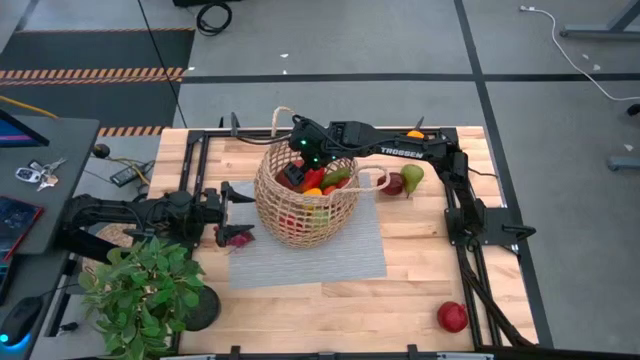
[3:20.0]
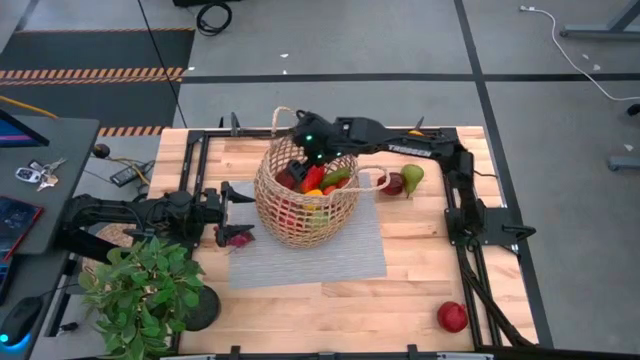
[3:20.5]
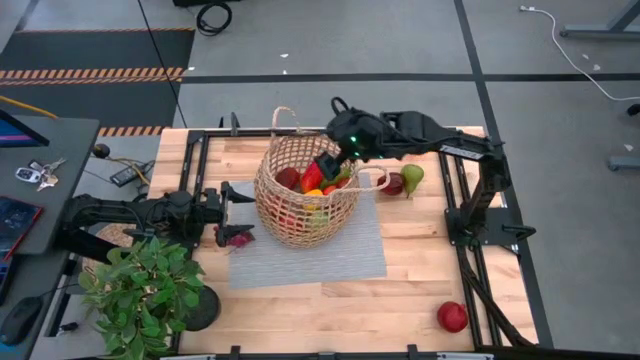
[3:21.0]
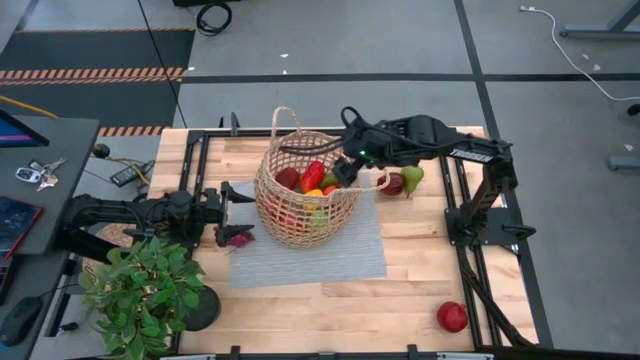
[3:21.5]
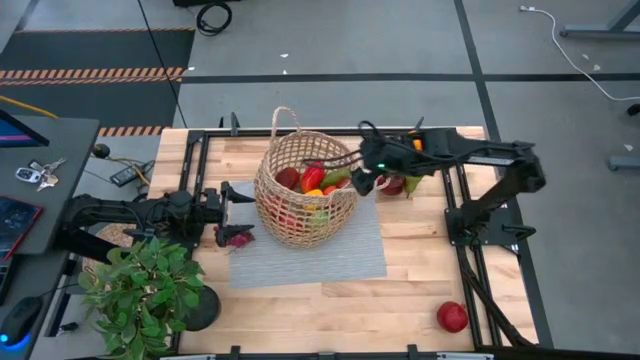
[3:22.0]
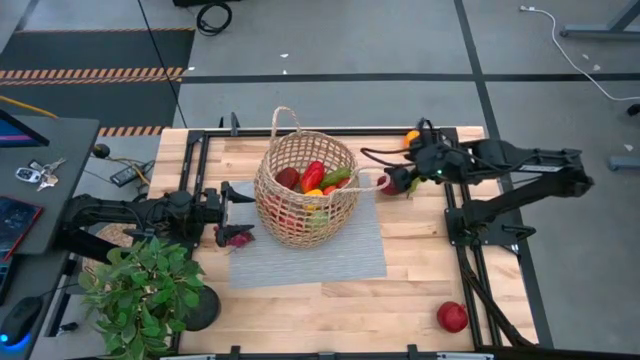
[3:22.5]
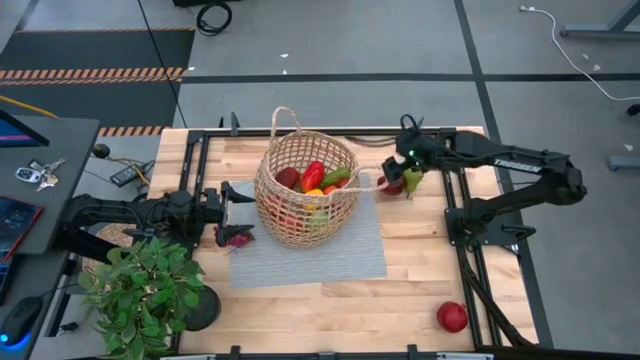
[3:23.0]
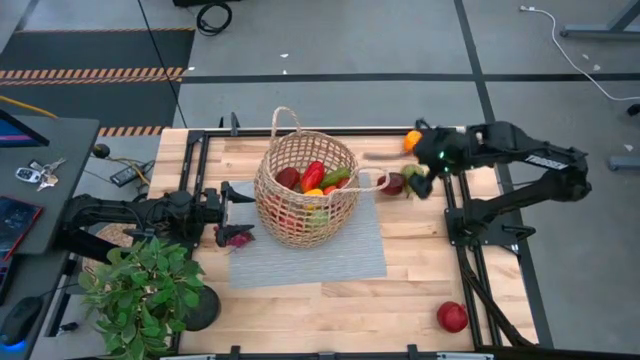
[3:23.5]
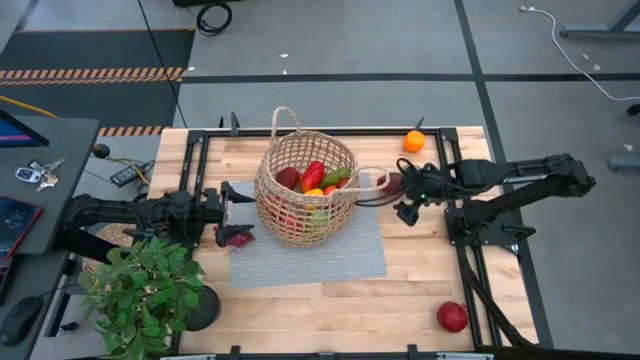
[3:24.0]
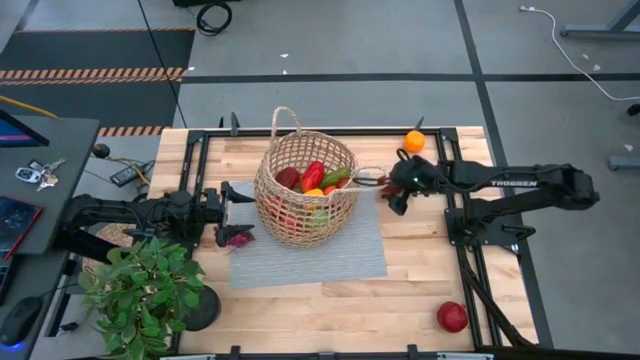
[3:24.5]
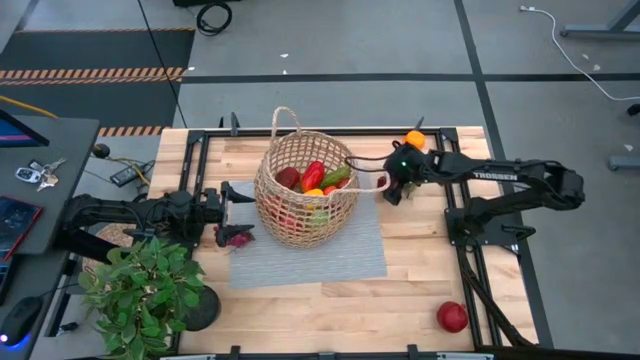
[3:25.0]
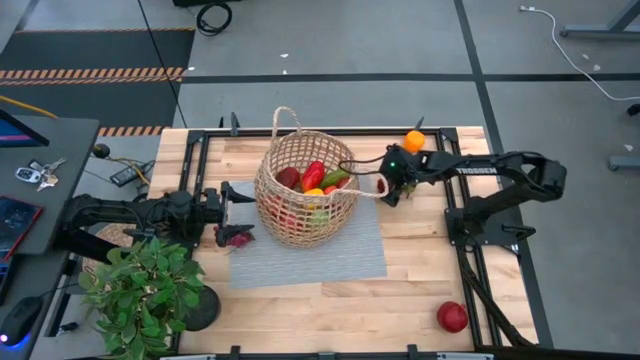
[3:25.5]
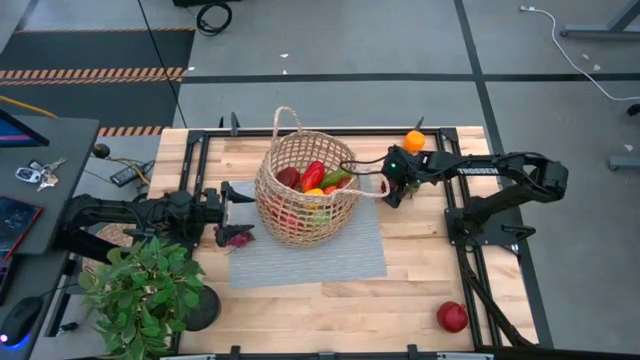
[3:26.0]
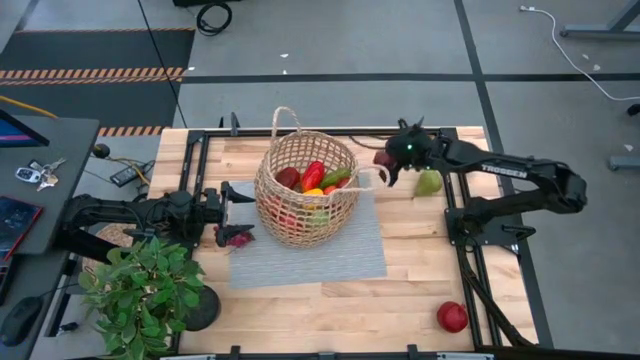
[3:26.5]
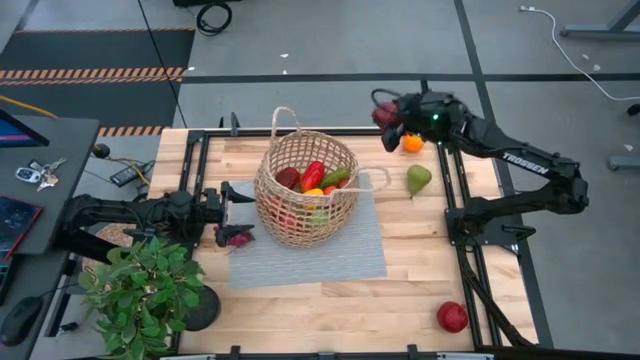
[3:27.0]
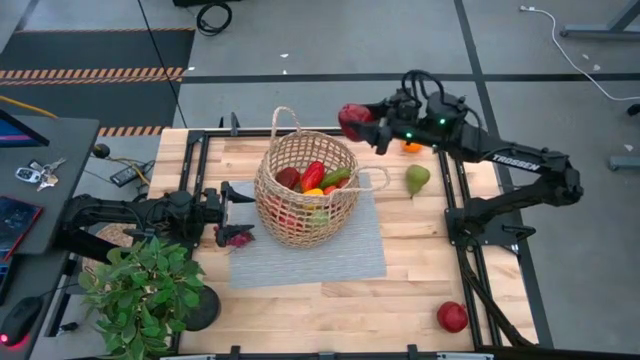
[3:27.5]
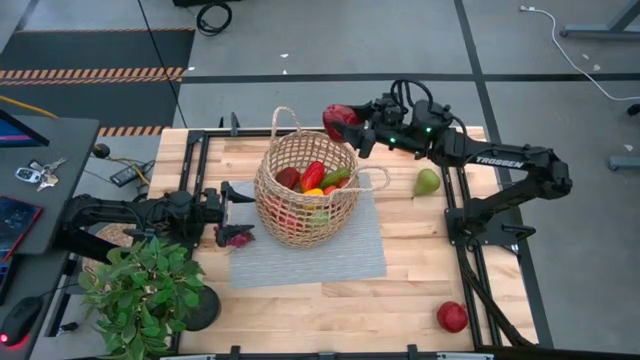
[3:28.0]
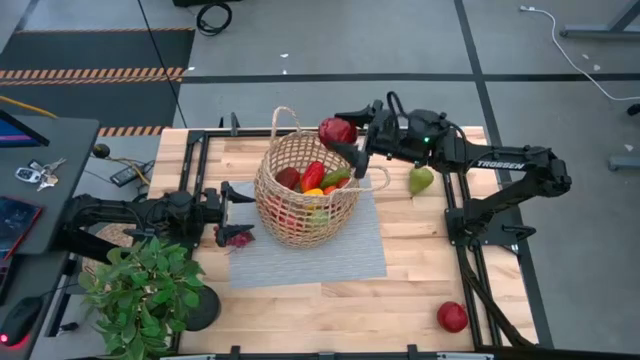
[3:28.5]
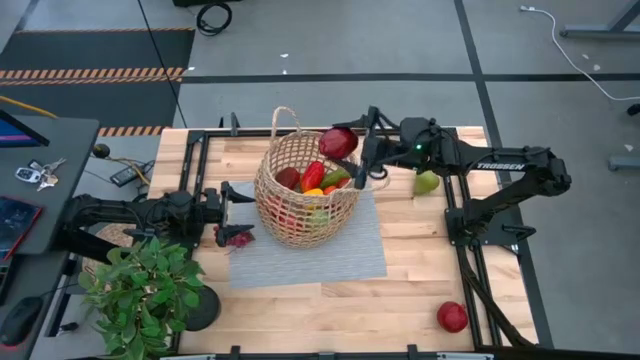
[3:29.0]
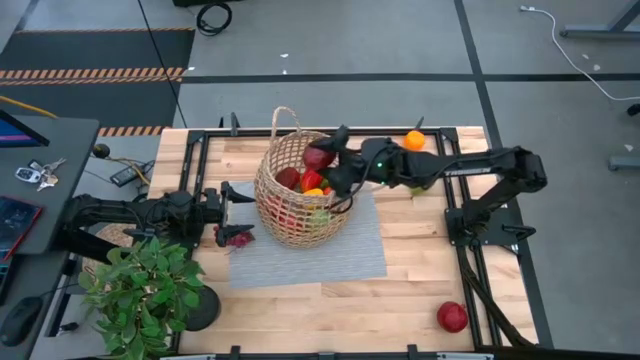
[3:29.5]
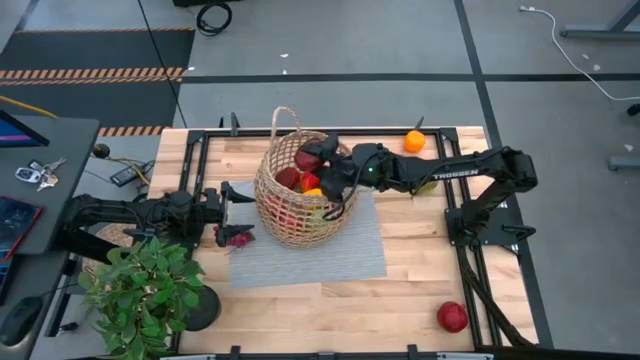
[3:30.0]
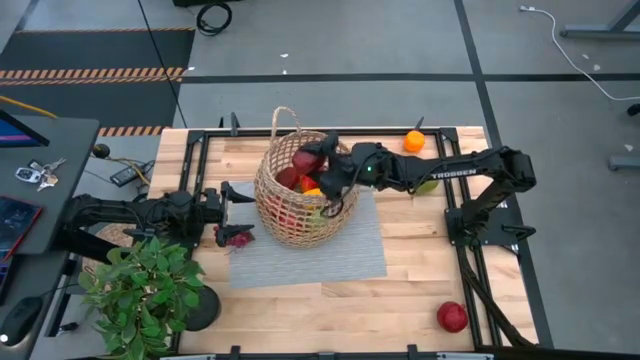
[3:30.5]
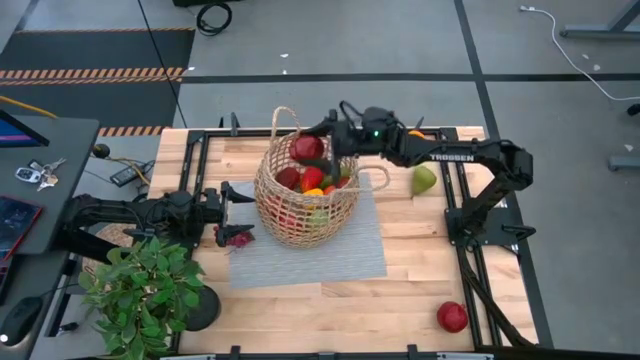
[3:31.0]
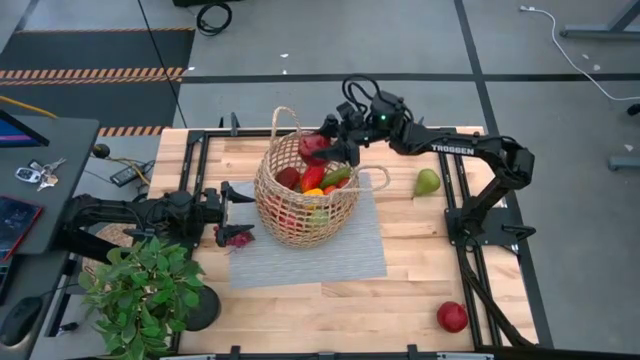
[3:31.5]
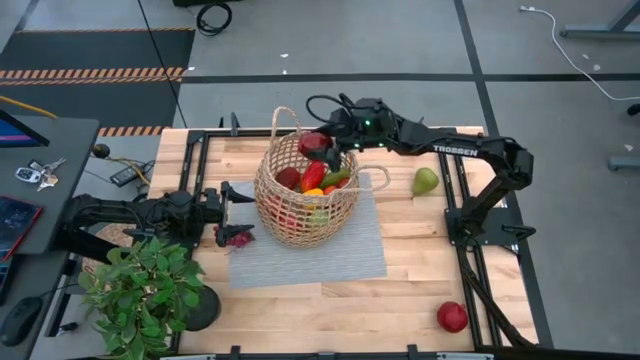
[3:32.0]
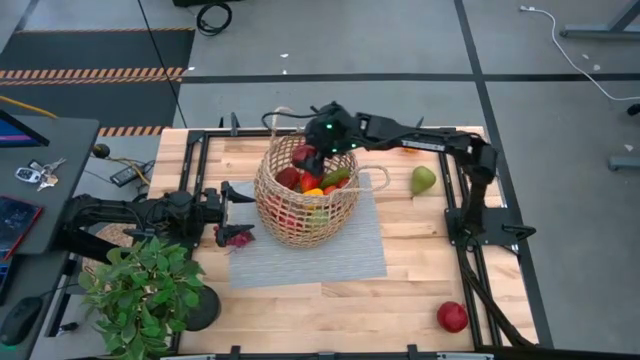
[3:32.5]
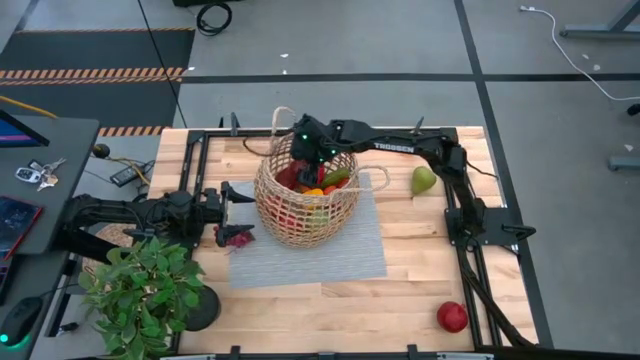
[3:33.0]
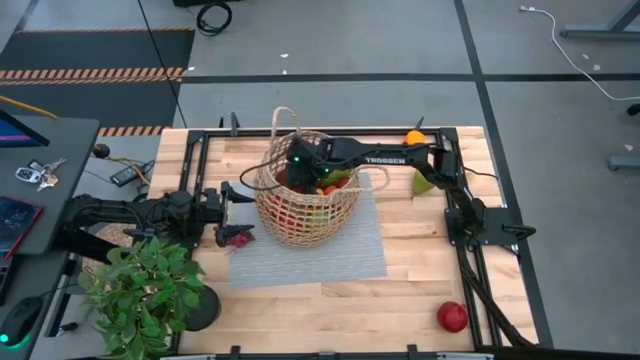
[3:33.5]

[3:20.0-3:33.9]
Task: Build produce basket
Put the red apple into the brown basket

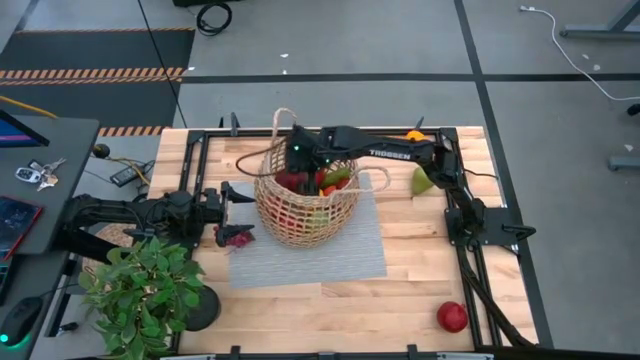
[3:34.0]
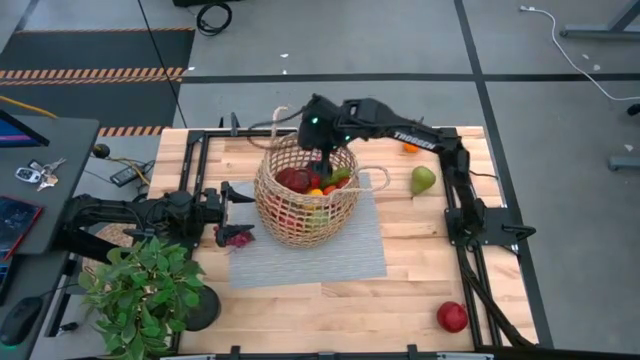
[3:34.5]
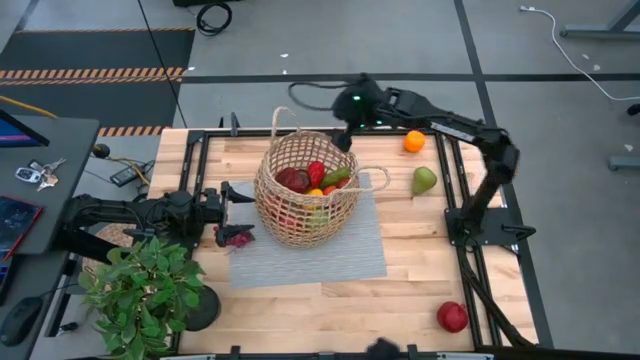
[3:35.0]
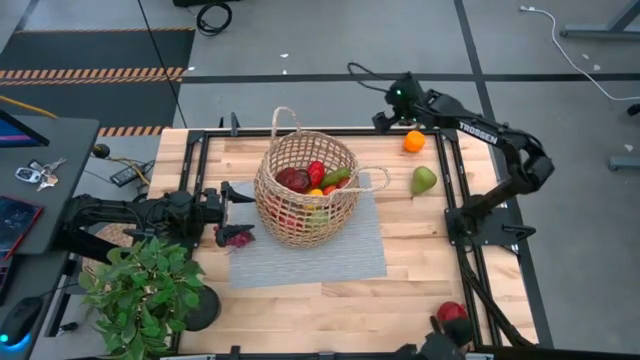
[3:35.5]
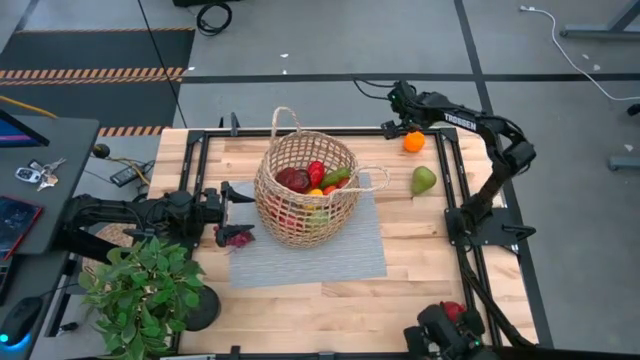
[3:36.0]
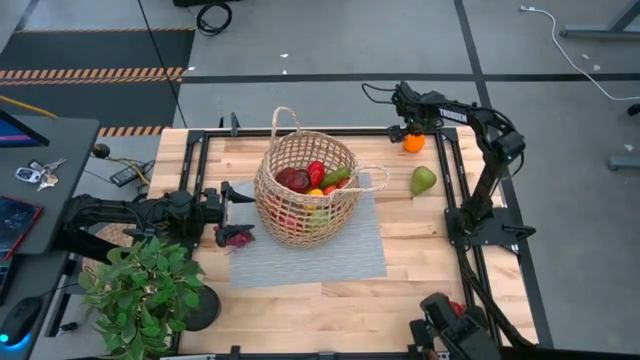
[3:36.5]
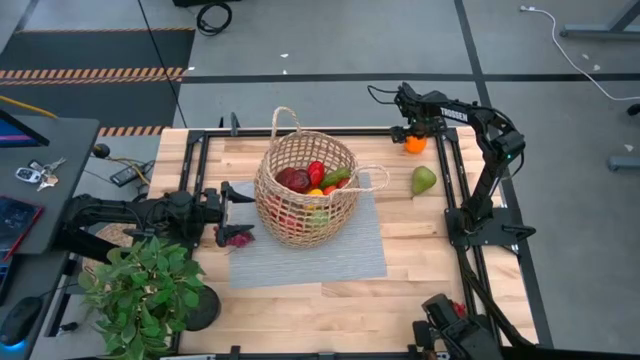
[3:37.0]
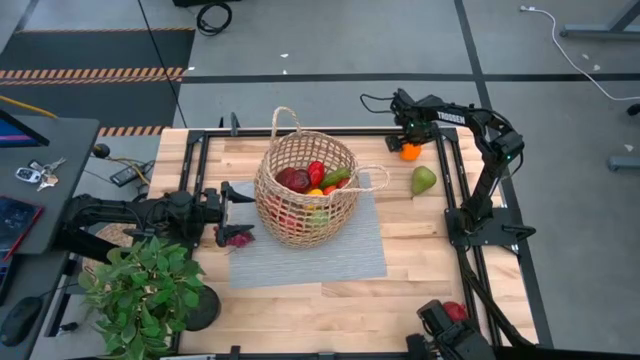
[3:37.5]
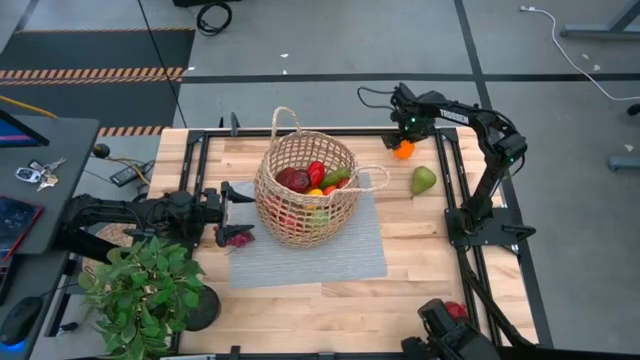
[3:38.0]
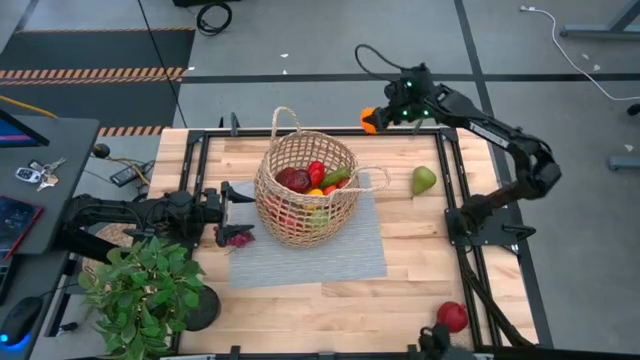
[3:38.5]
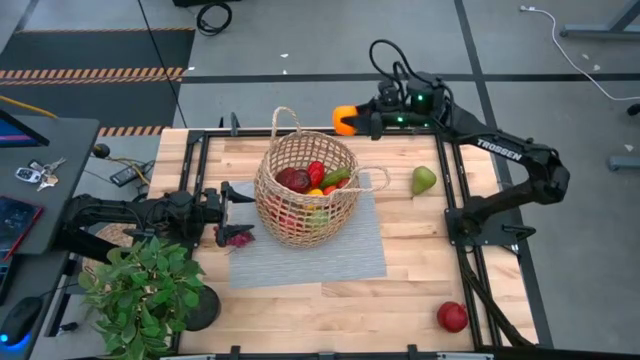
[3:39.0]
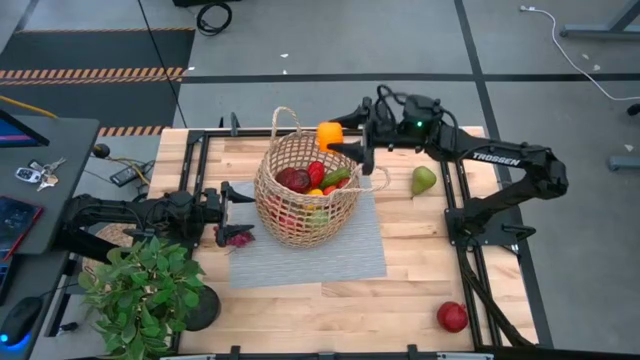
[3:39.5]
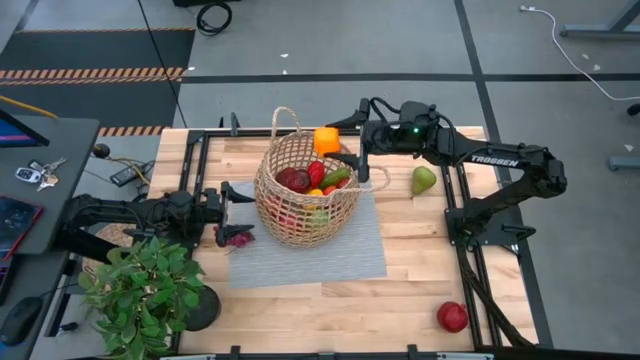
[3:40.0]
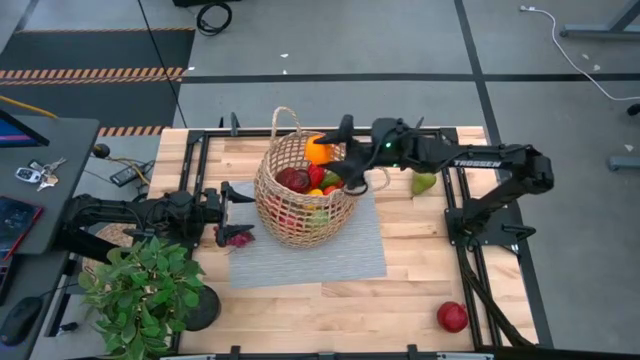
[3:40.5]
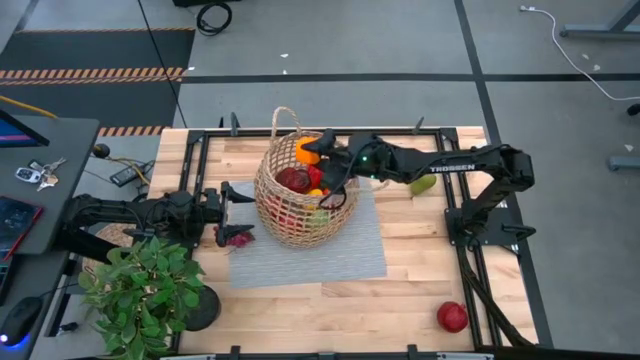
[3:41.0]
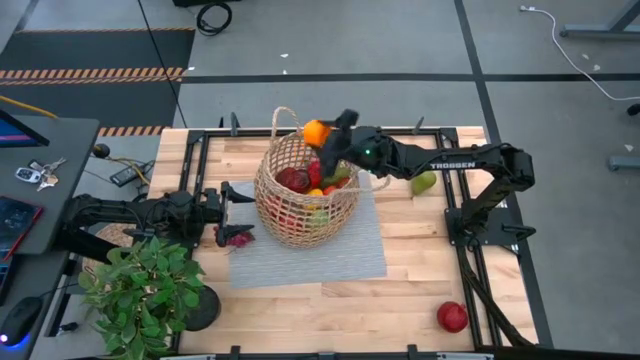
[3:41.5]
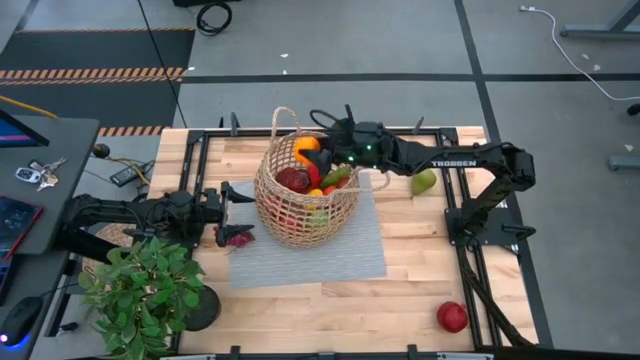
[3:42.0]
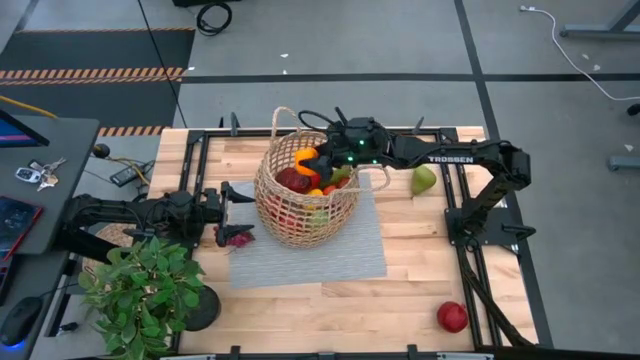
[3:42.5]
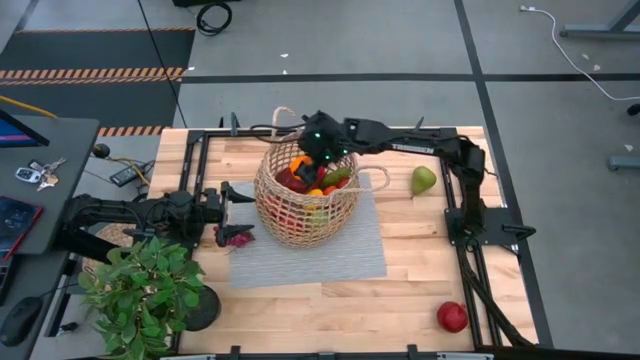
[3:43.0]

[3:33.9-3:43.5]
Put the orange into the brown basket
